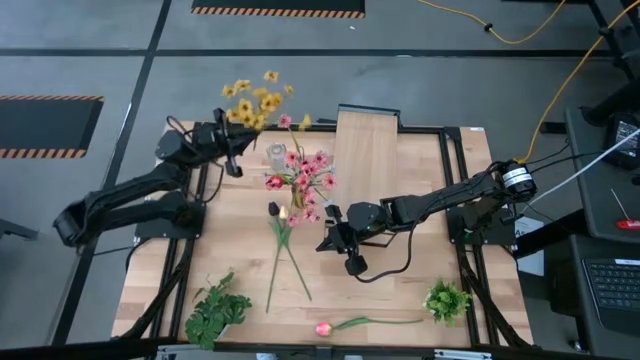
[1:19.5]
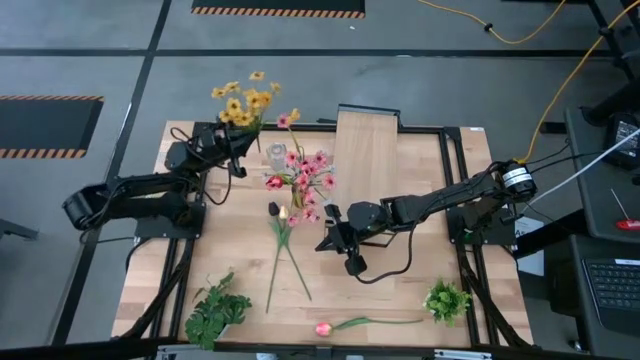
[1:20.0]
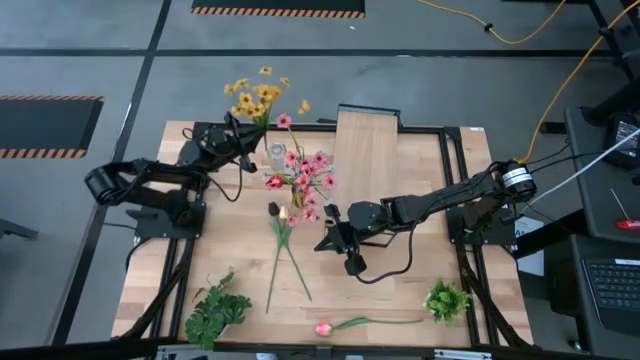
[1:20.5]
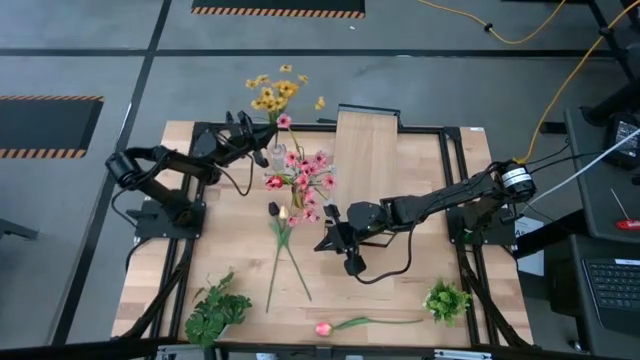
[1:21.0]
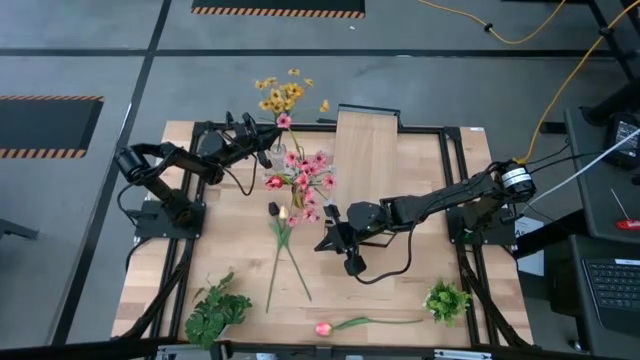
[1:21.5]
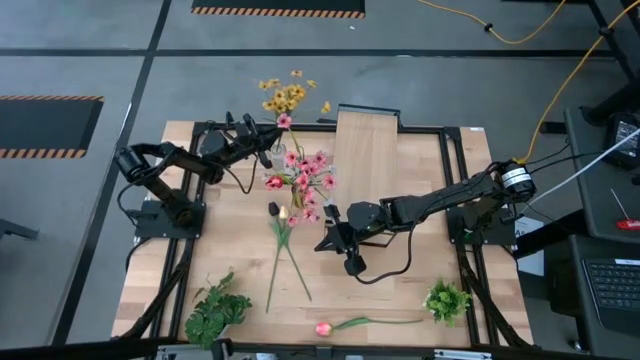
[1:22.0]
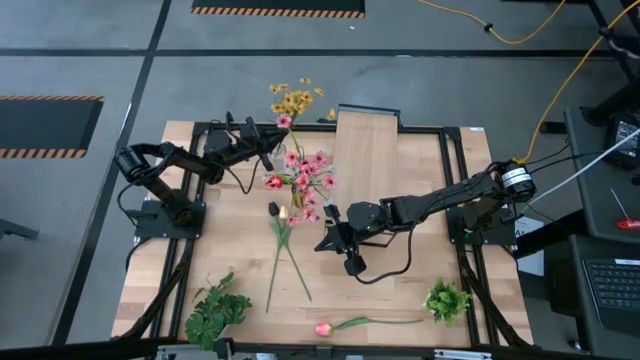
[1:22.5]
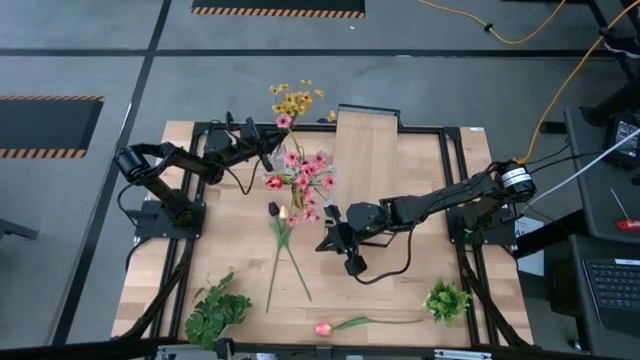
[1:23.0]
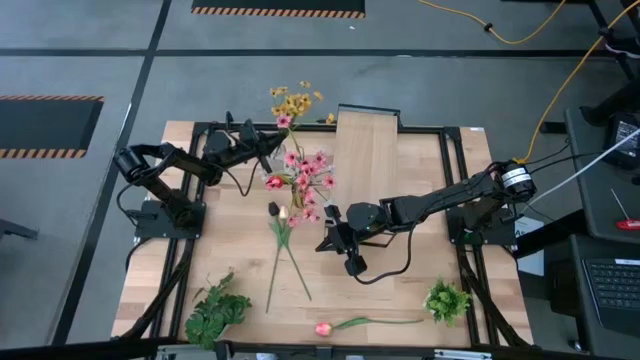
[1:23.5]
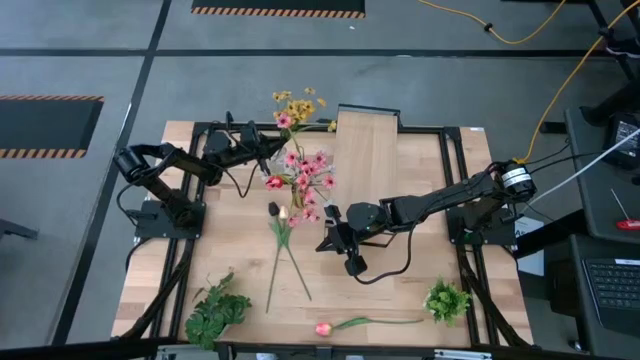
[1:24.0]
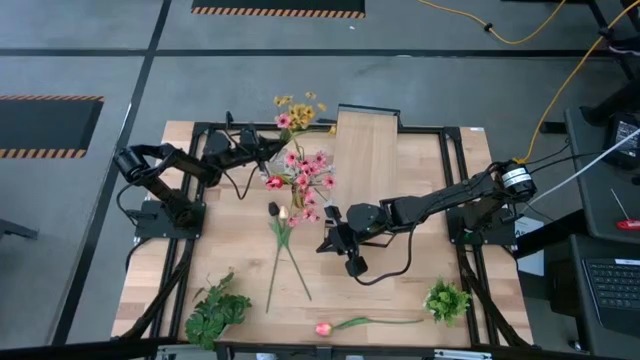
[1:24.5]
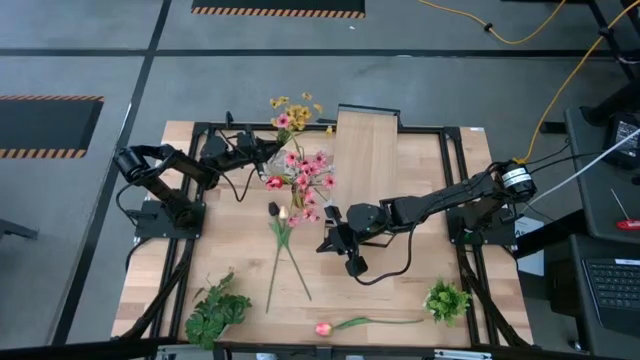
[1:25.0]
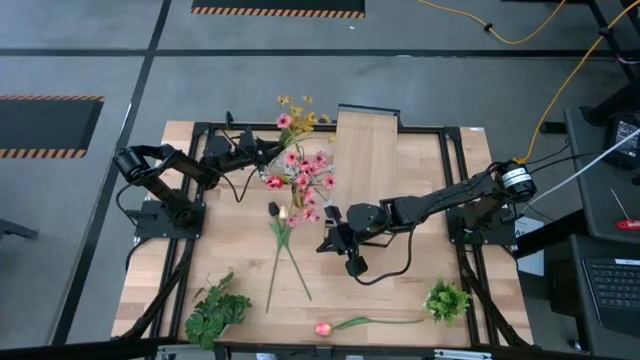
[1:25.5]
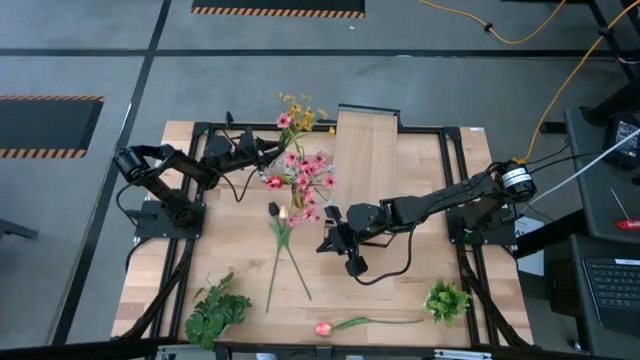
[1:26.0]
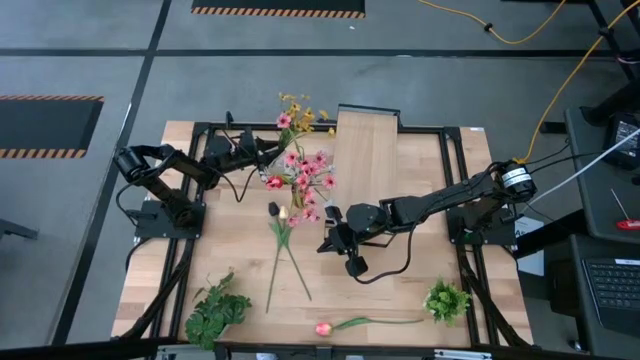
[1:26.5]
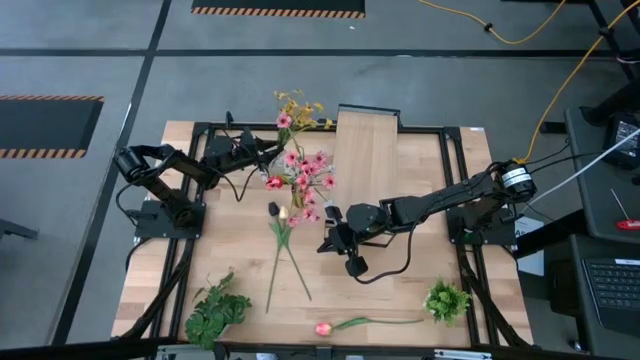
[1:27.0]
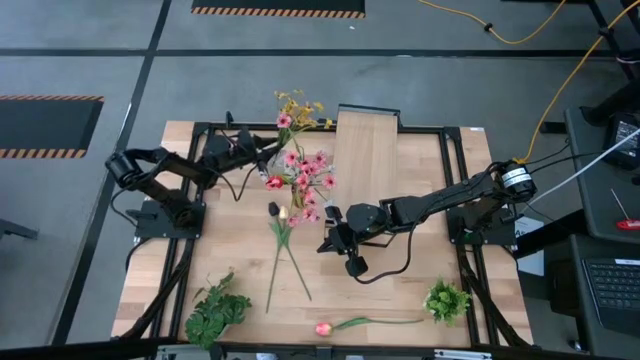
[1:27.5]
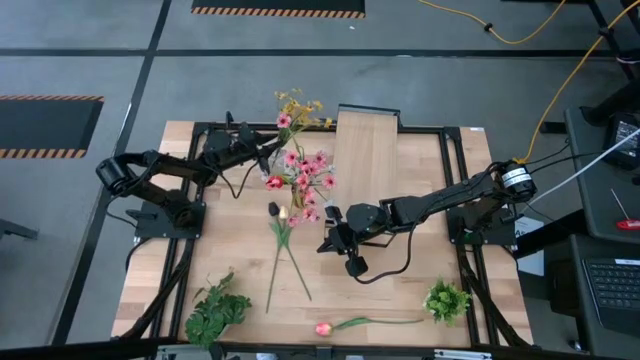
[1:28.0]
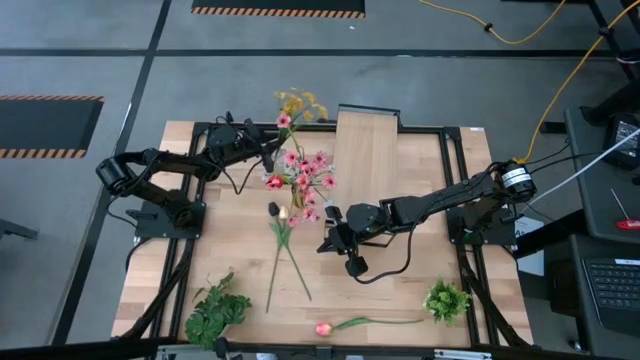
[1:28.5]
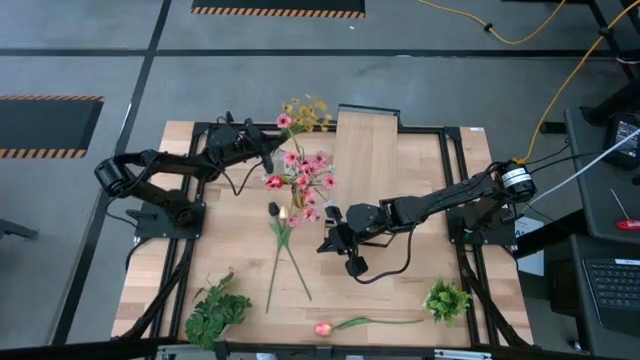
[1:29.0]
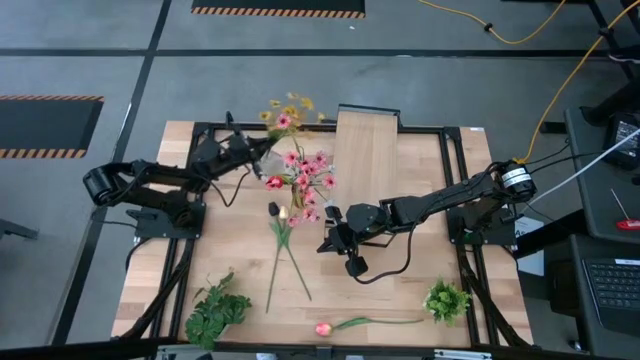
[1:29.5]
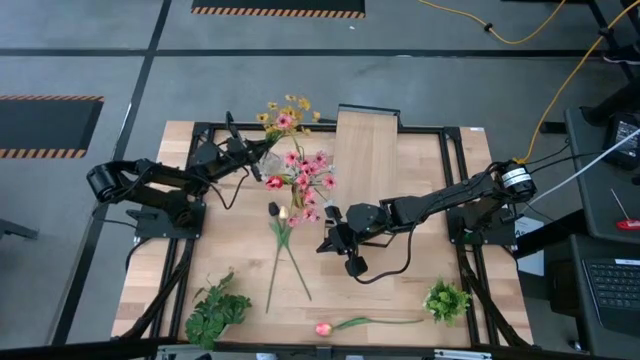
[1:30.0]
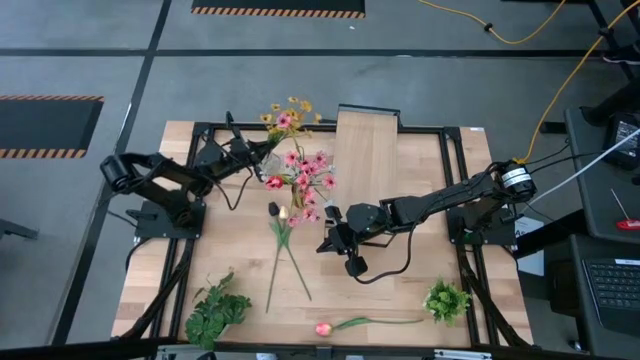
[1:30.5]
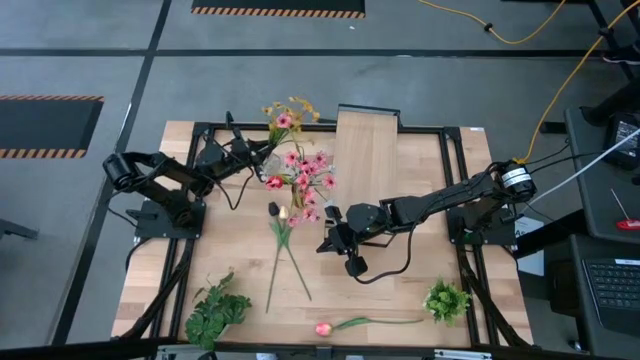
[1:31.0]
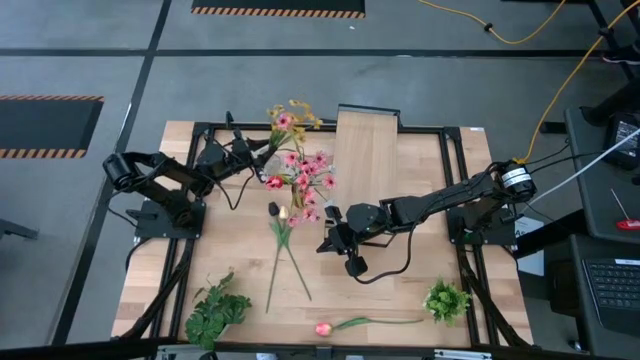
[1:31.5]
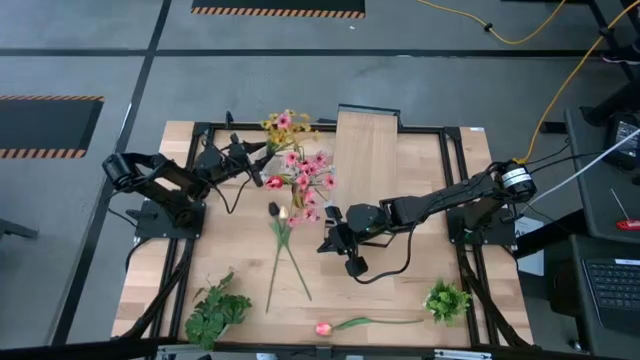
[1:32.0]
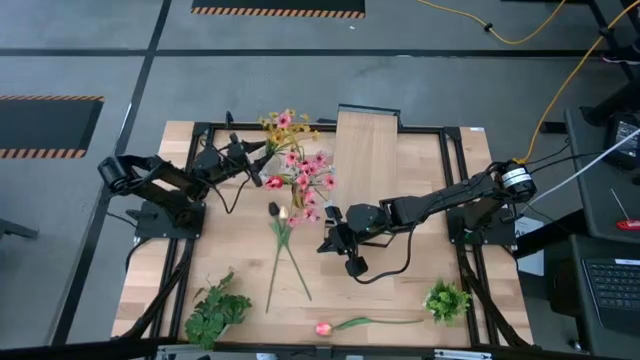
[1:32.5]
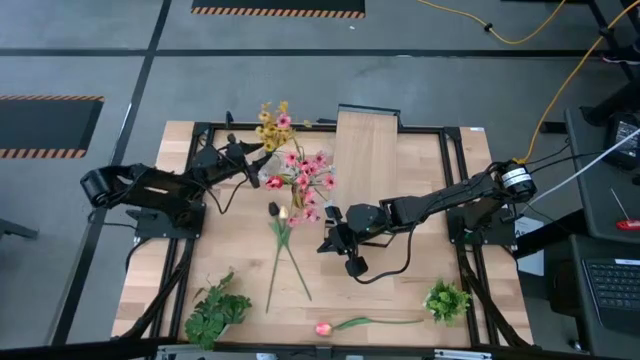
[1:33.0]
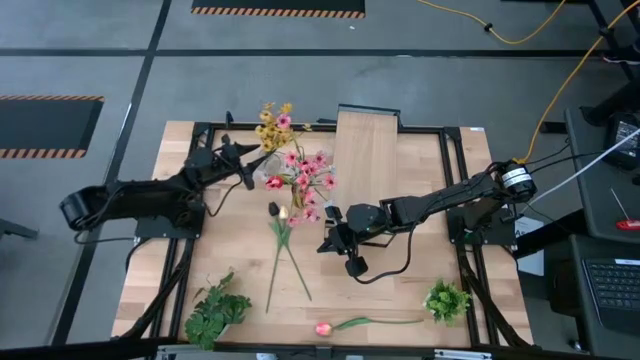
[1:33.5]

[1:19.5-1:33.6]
Task: Pick and place flowers into a vace then onto a shelf
Put the yellow flowers into the transparent vase
